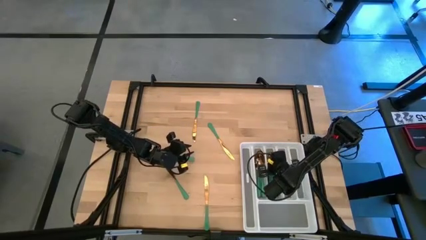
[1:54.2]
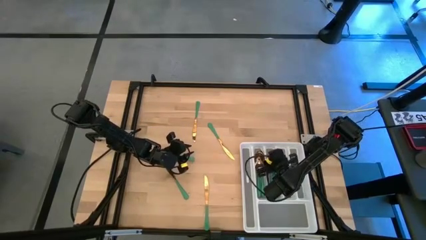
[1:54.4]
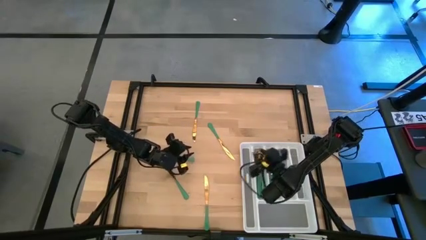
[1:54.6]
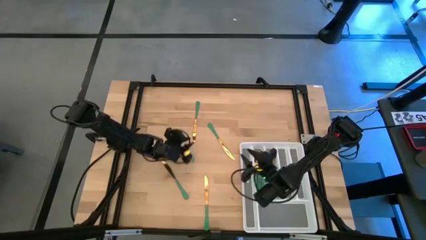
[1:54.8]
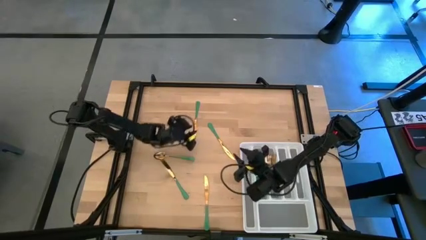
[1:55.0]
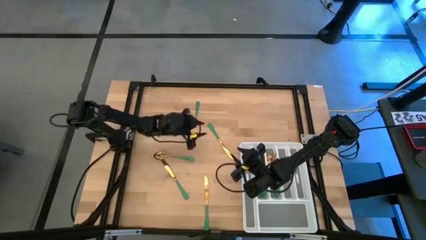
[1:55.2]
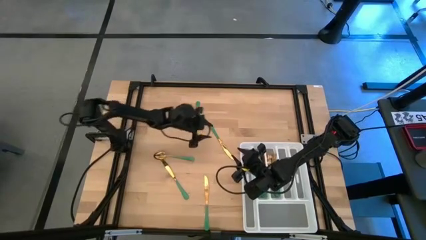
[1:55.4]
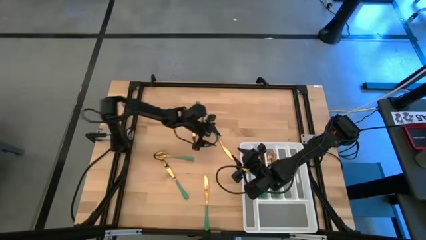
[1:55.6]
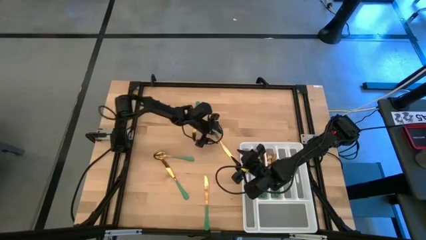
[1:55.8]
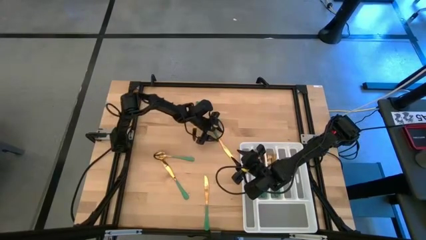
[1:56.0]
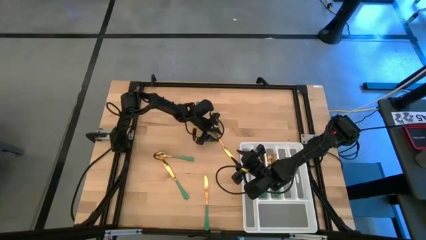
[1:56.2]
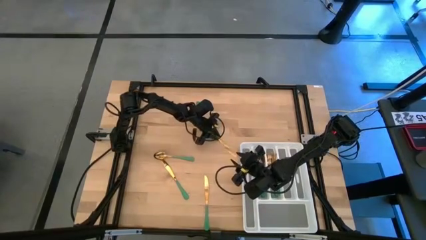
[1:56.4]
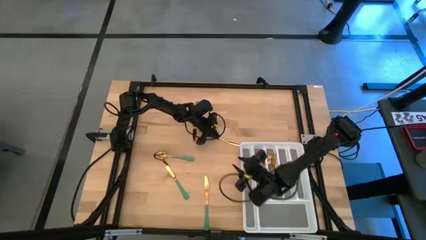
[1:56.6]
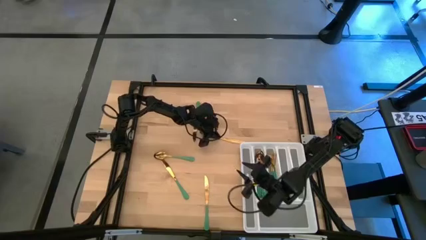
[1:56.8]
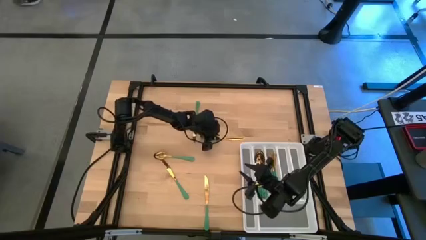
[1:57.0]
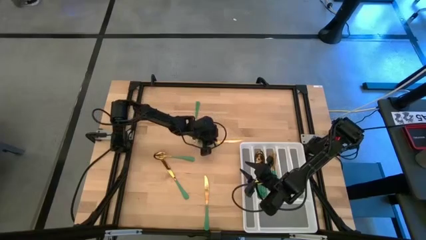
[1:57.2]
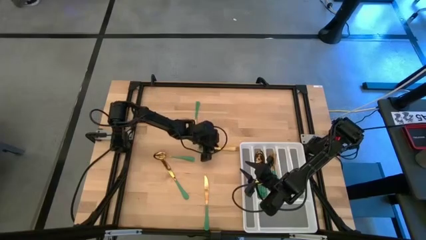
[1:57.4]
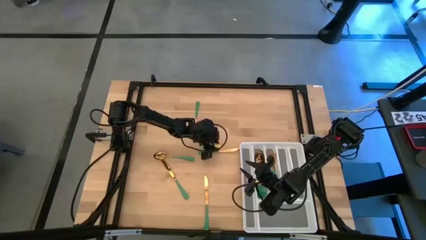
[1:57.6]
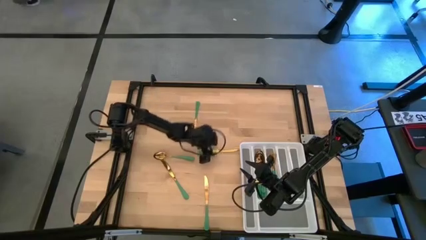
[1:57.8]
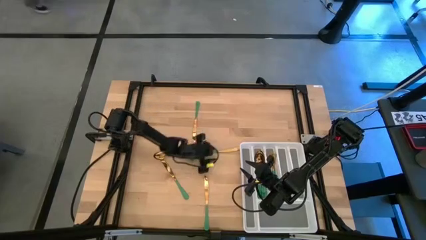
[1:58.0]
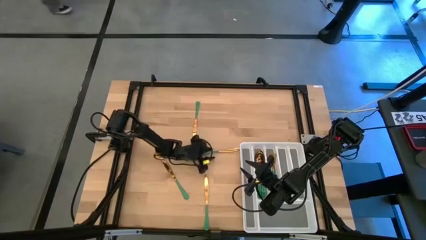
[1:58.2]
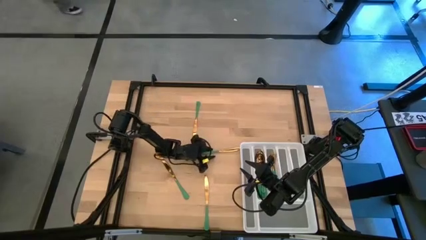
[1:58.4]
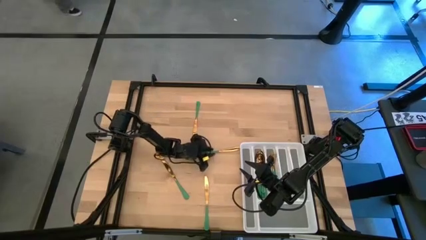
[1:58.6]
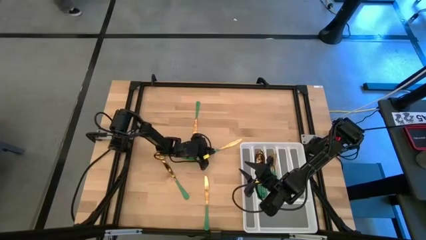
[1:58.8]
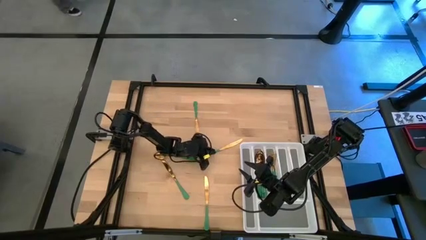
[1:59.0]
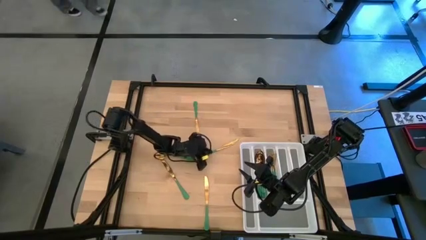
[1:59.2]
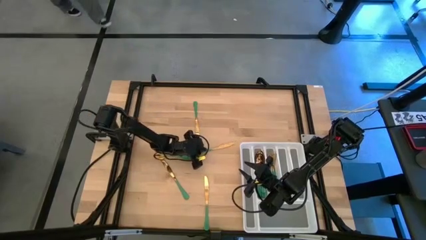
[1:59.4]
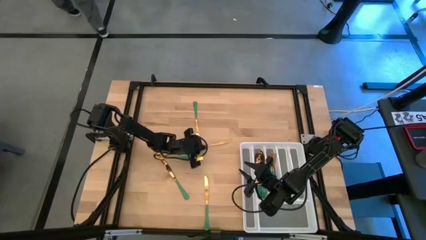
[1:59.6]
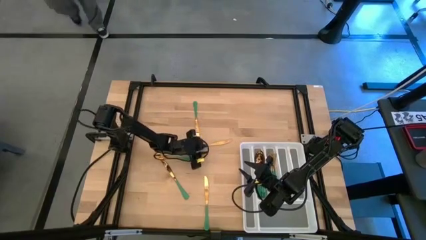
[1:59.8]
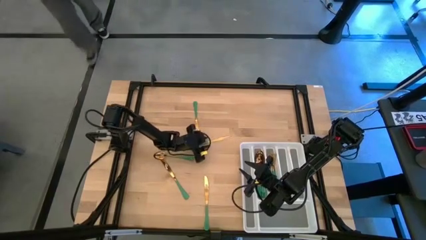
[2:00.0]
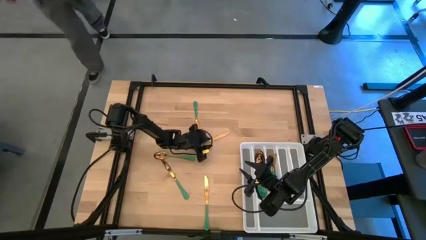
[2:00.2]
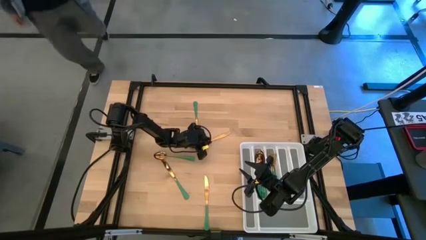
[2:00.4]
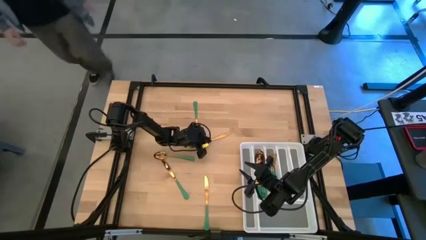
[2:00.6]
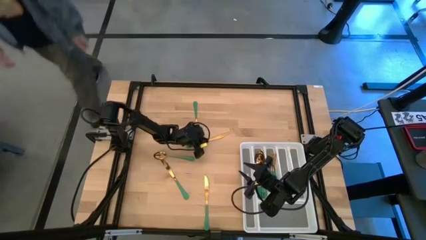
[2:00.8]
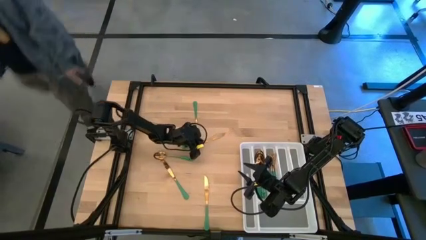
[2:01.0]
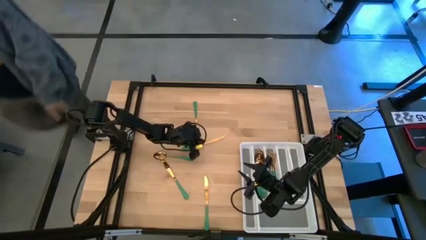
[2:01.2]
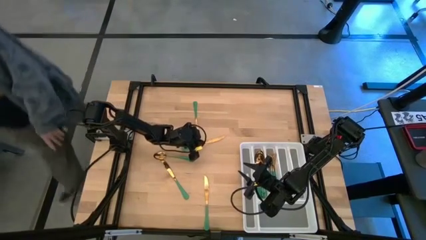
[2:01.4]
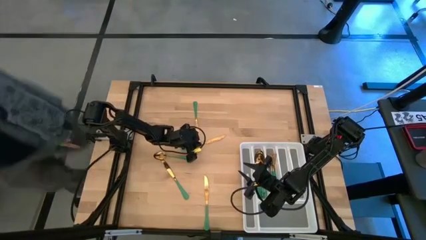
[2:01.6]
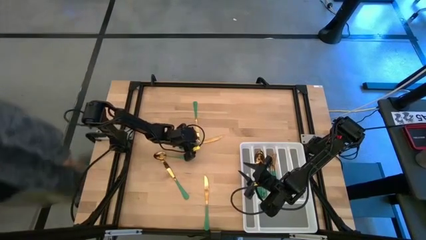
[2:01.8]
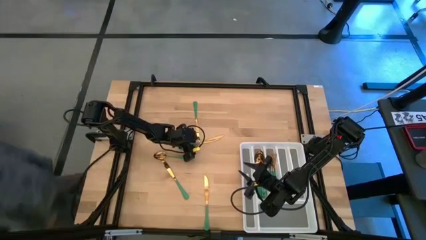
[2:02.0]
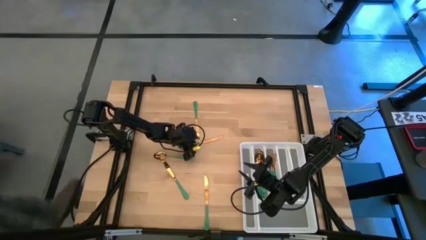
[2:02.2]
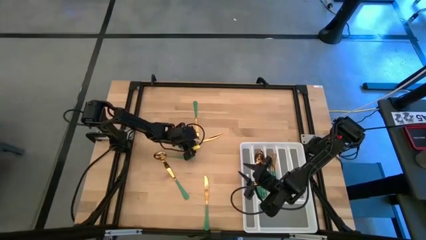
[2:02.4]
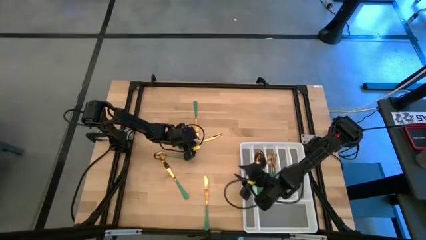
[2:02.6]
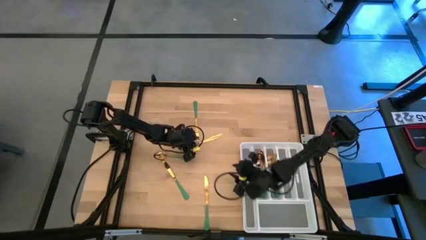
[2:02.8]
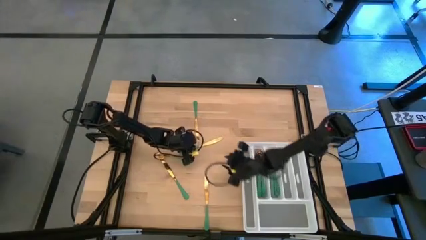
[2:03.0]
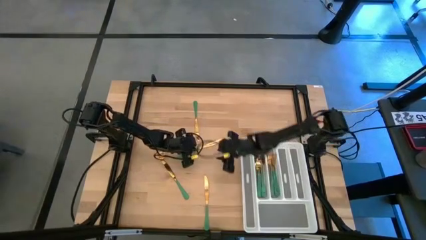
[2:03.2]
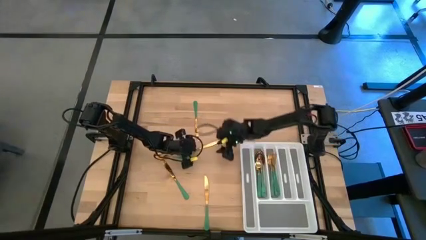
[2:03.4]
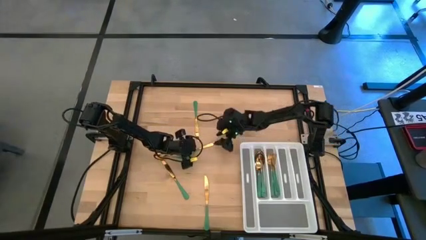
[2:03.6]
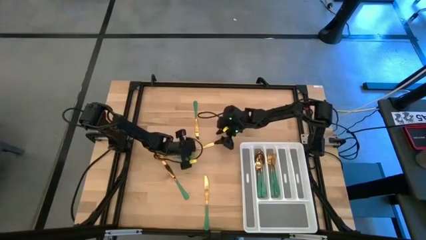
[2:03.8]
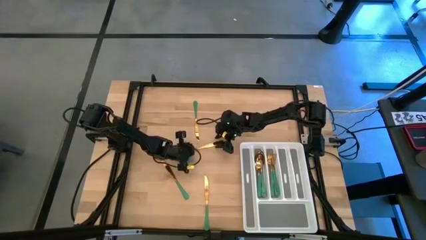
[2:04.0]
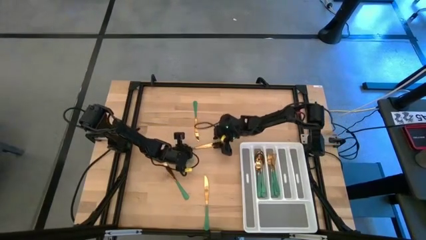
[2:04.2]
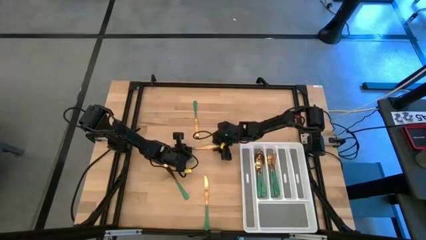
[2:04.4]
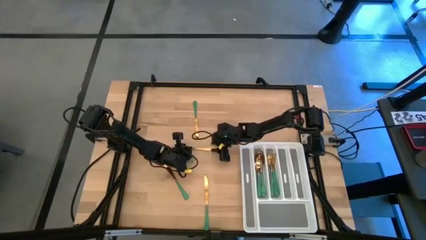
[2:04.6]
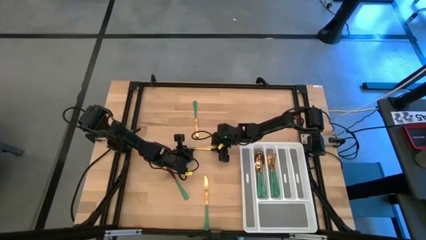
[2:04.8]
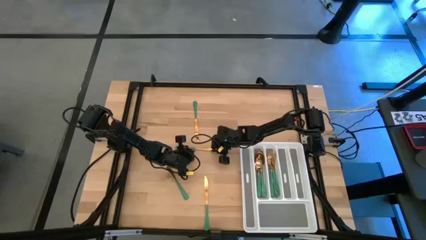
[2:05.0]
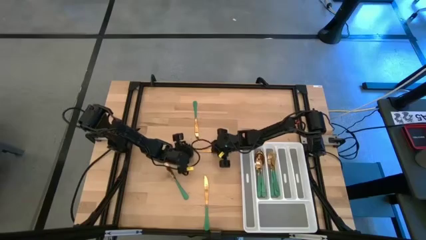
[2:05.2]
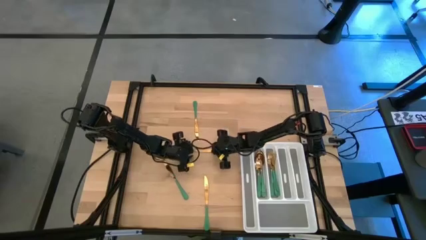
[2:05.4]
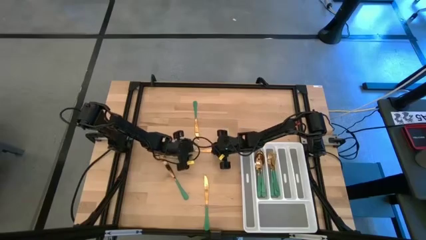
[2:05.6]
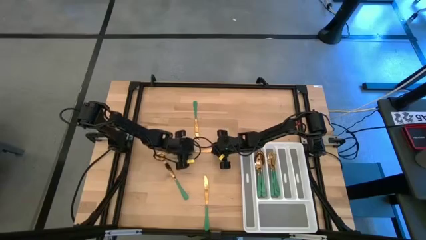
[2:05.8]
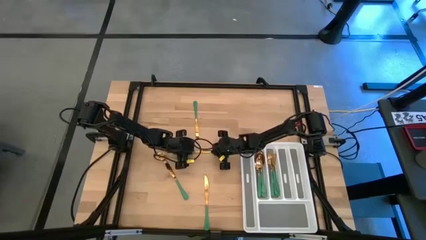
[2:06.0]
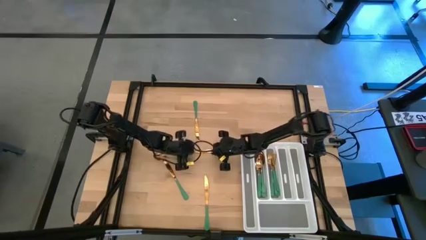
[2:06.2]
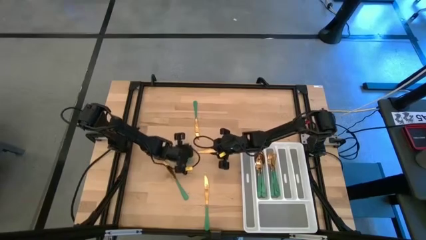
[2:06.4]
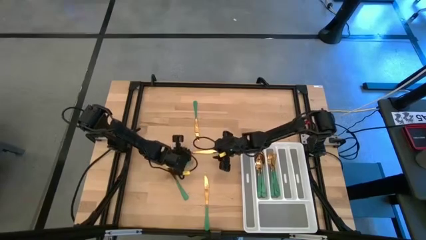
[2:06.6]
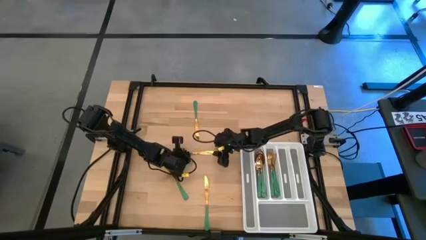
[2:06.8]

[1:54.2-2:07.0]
Task: Sort silverware
Put the middle right green knife into the silverware rack
